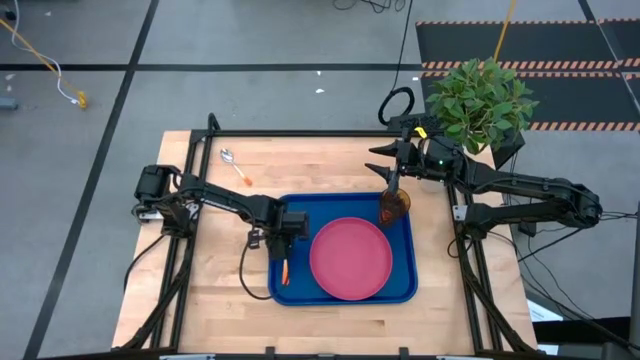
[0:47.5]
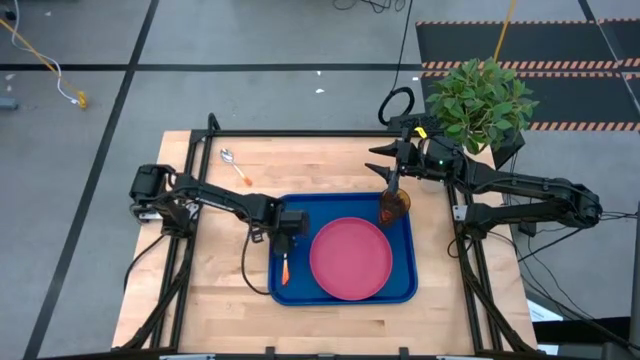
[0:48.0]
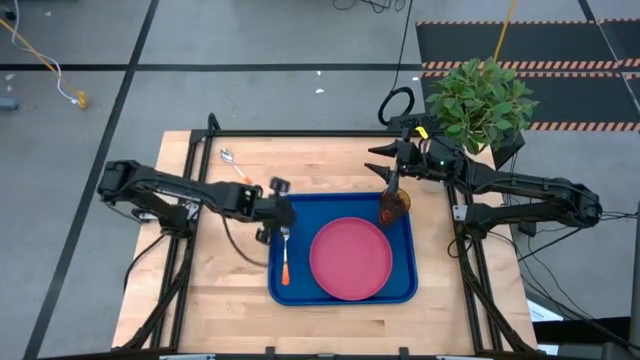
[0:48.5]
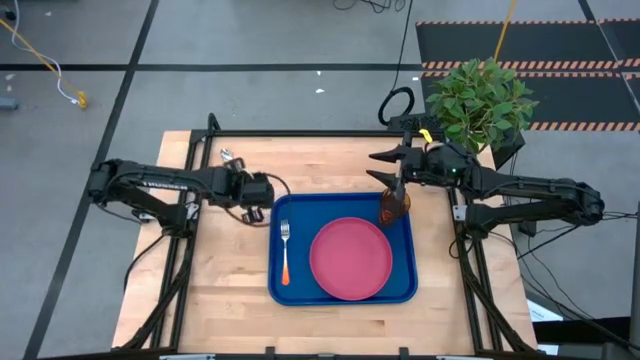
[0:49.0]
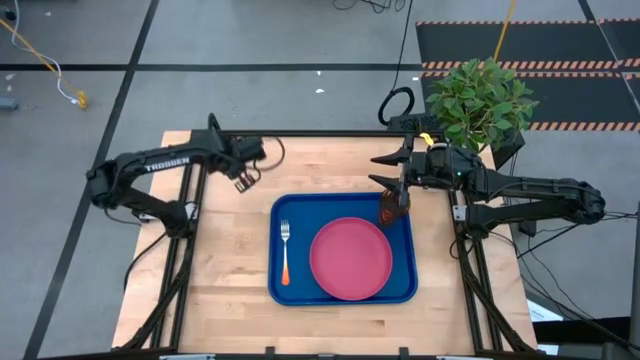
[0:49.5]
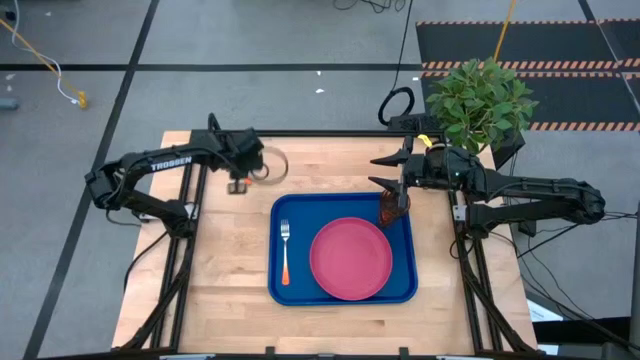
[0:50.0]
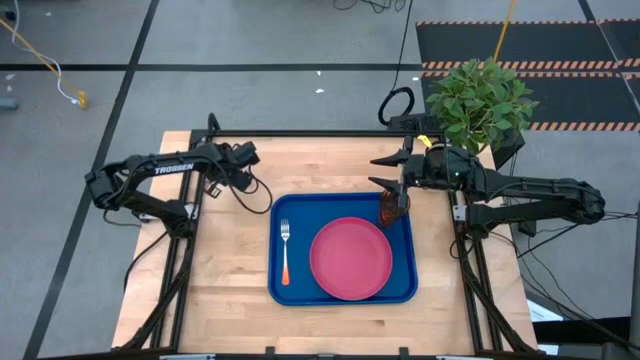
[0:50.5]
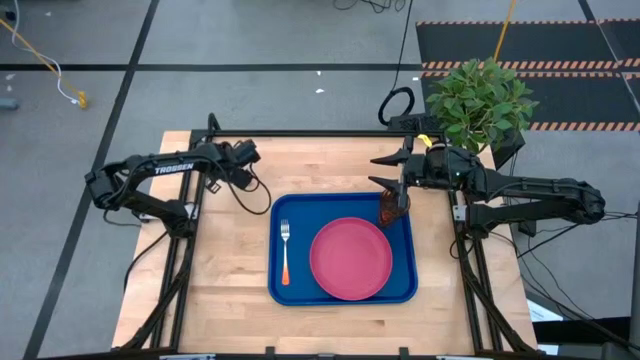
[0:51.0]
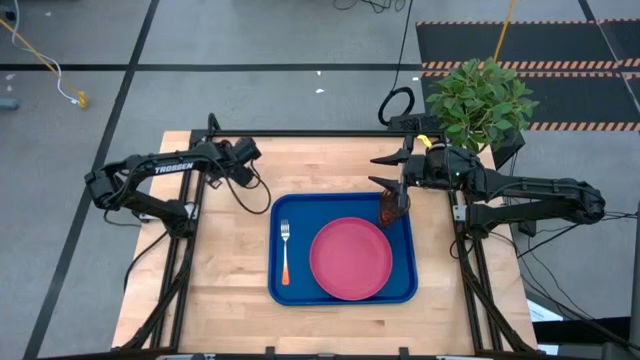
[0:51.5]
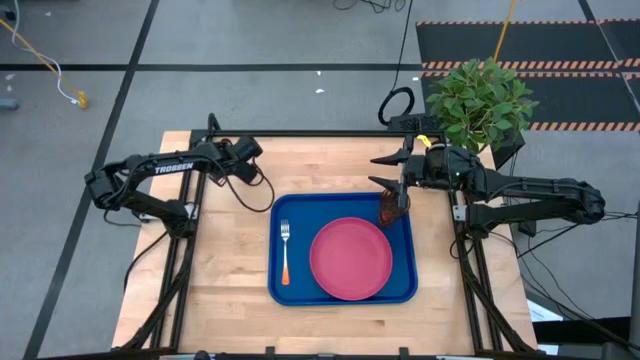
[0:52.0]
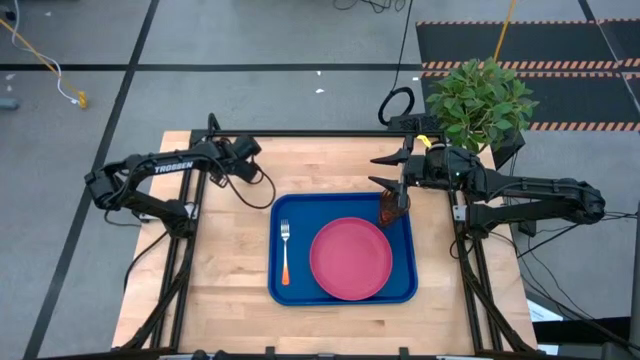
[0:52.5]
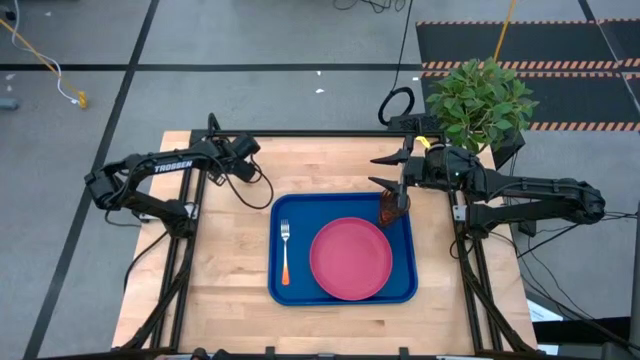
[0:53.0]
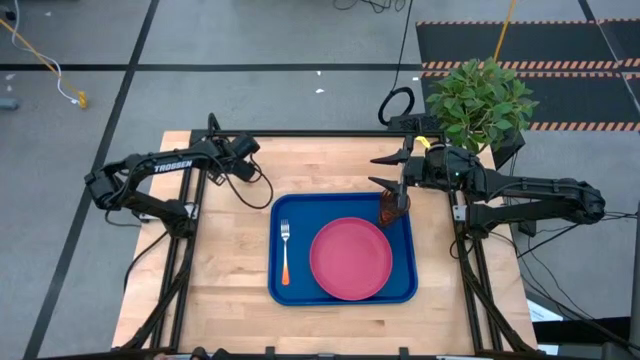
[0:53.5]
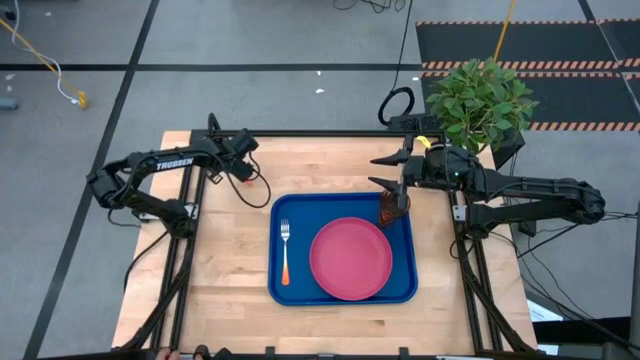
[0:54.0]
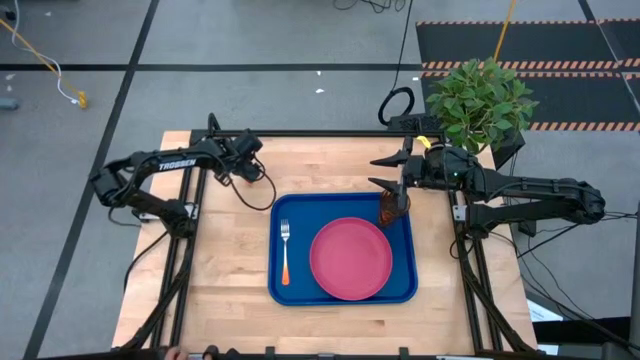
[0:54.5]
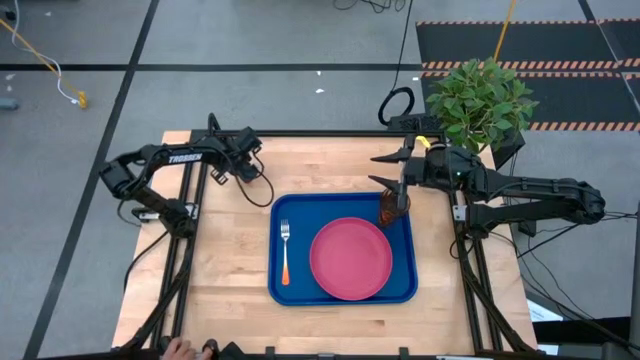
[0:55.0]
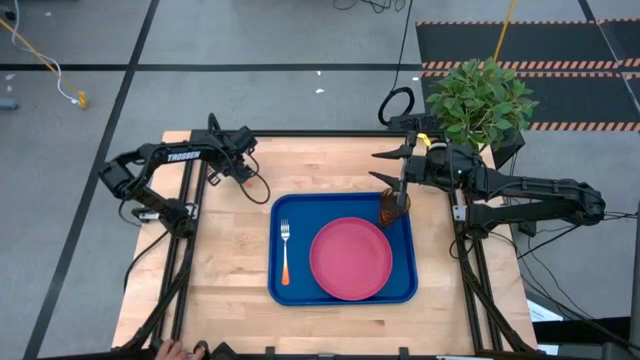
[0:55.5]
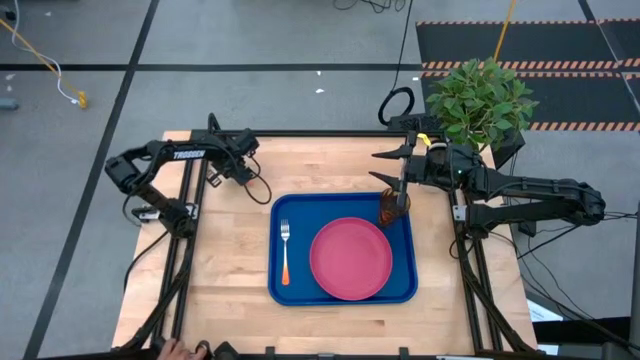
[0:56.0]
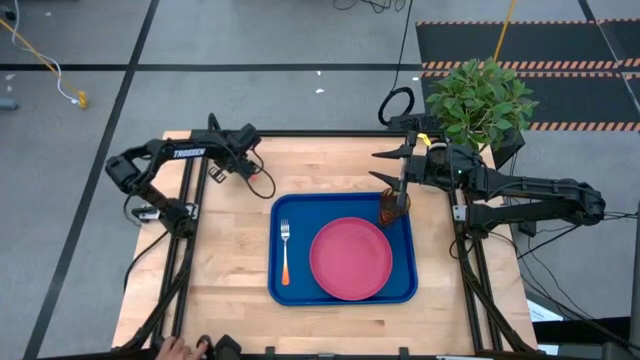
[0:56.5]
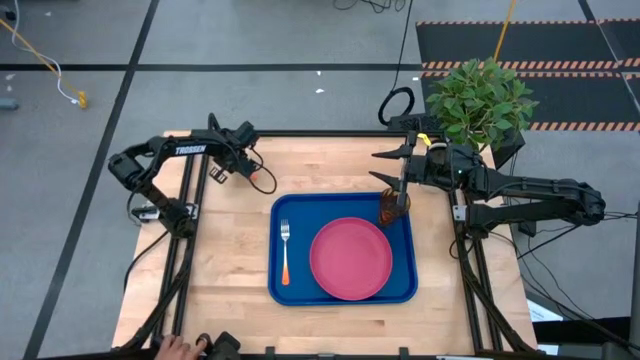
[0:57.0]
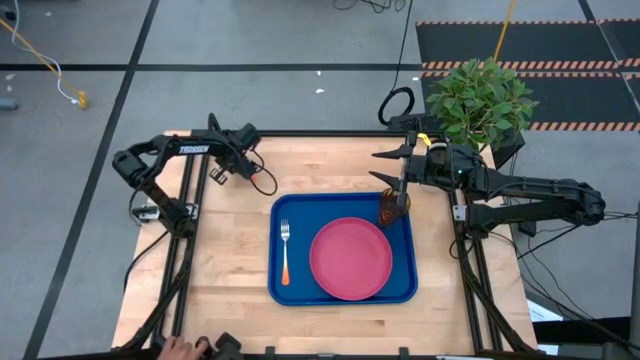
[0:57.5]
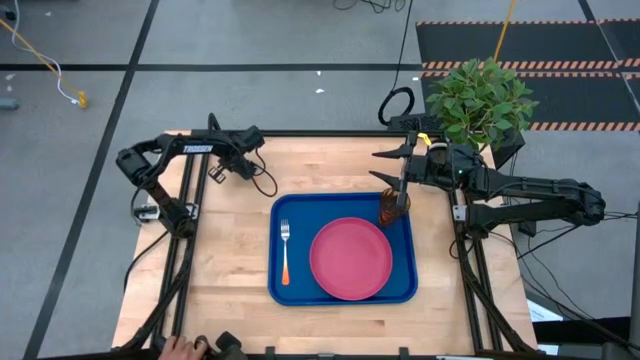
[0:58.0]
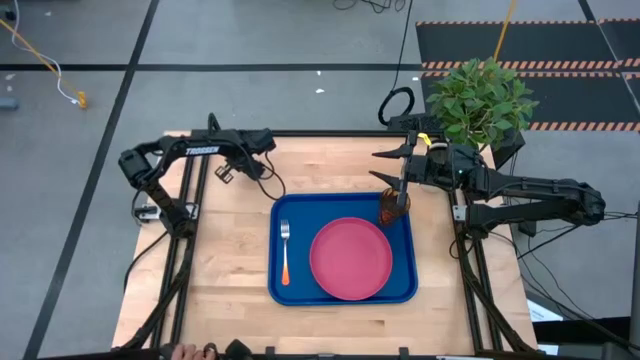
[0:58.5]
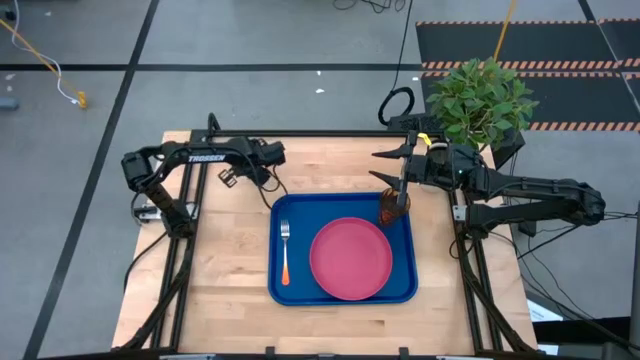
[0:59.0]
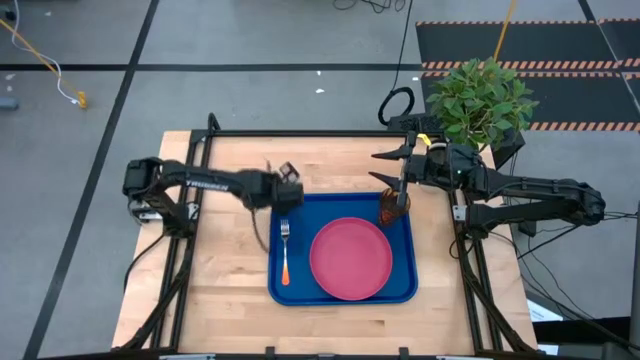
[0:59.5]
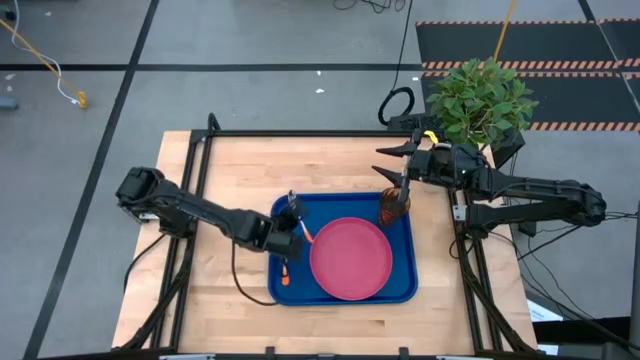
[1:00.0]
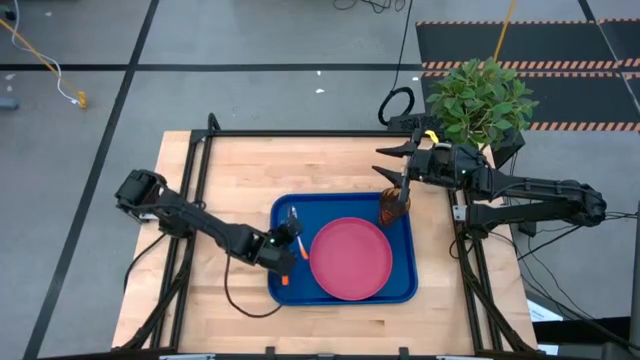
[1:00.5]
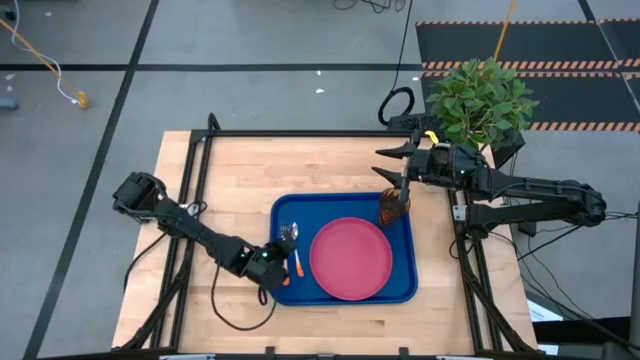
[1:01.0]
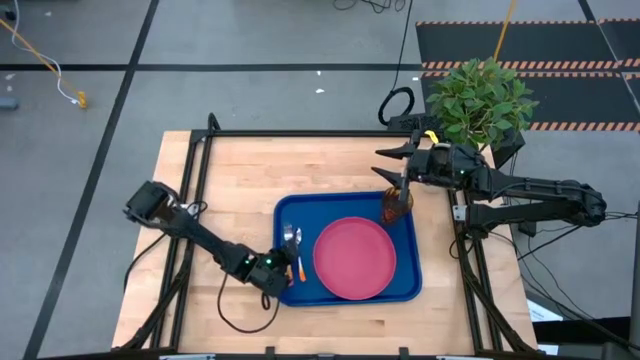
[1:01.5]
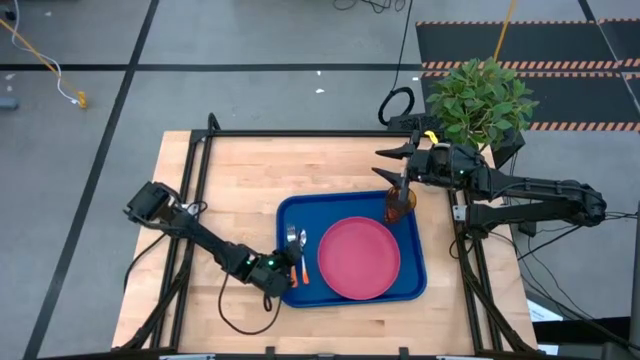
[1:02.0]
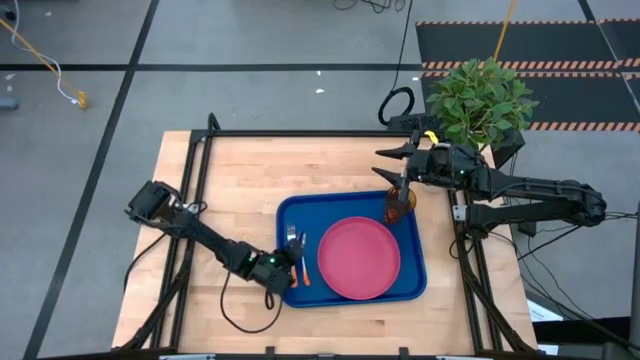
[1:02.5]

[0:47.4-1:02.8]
Task: Pick and place plate/cup/fork/spoon on tray
Put the orange spoon on the blue tray between the orange fork and pink plate

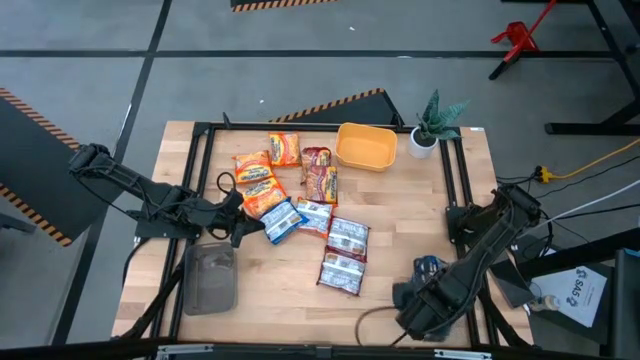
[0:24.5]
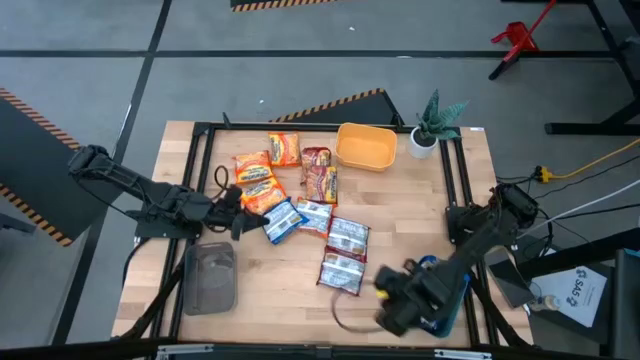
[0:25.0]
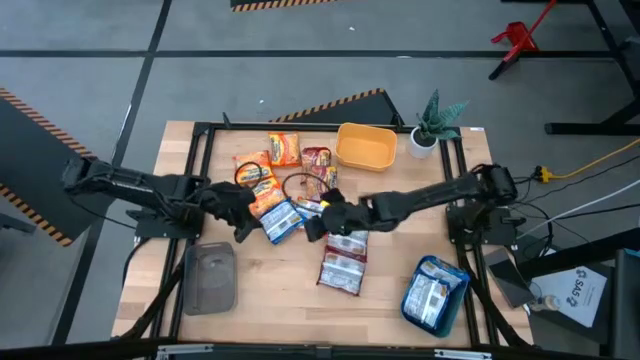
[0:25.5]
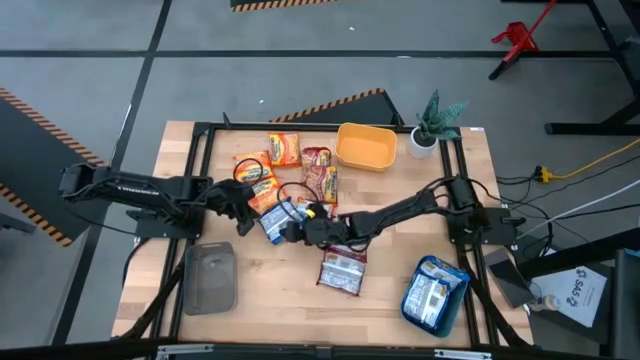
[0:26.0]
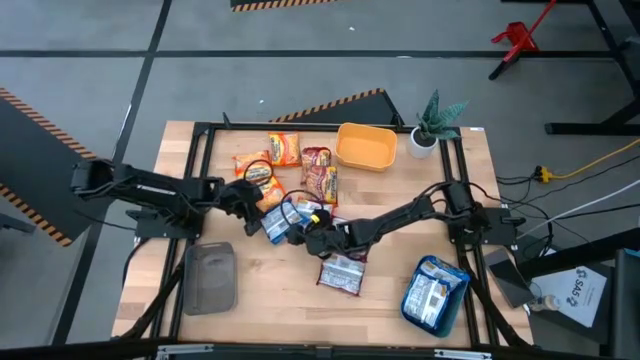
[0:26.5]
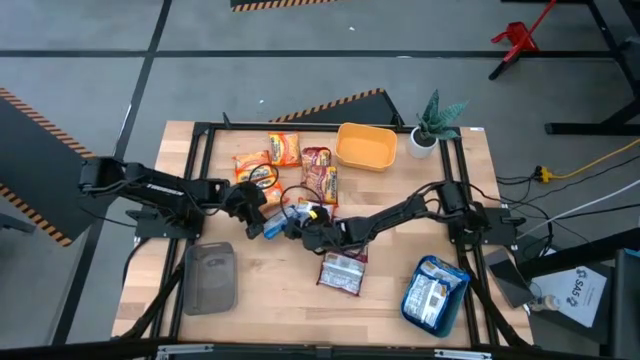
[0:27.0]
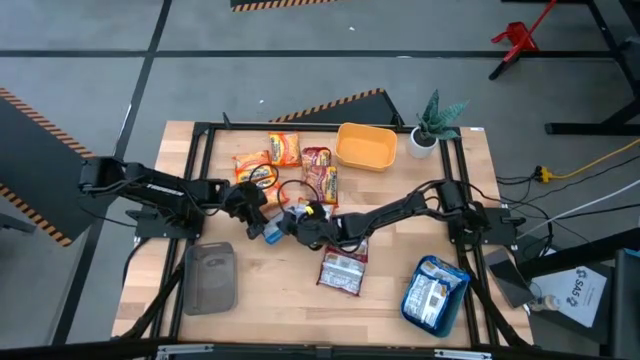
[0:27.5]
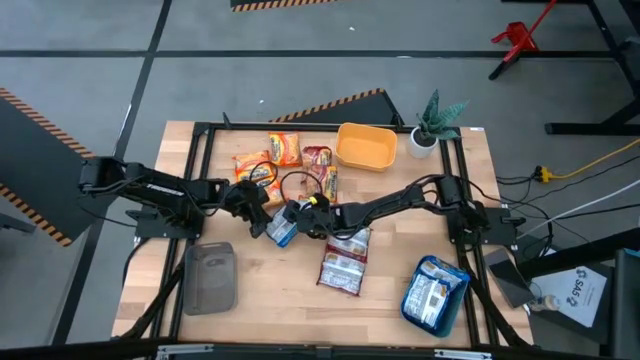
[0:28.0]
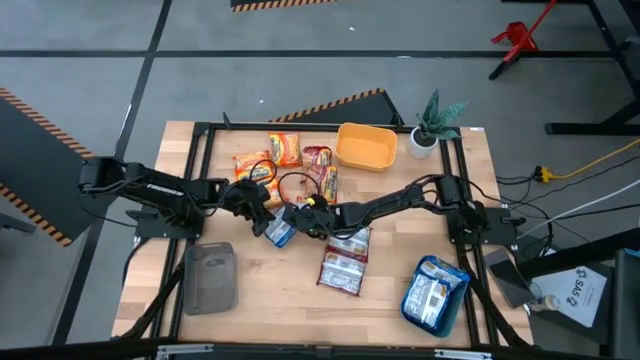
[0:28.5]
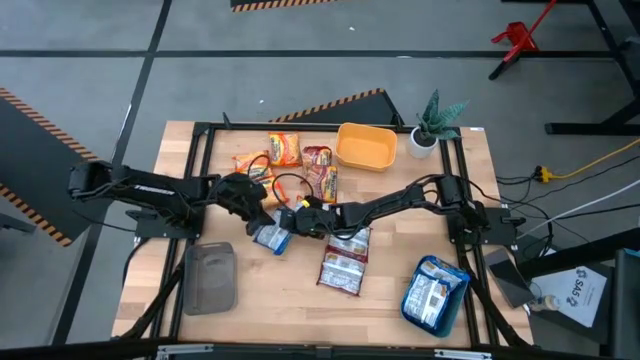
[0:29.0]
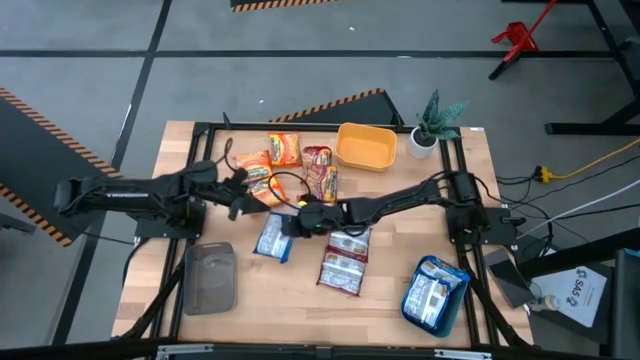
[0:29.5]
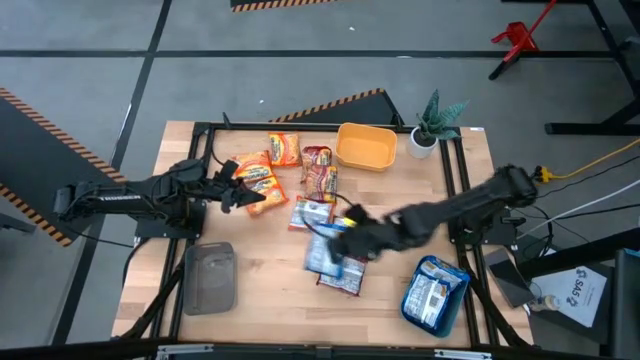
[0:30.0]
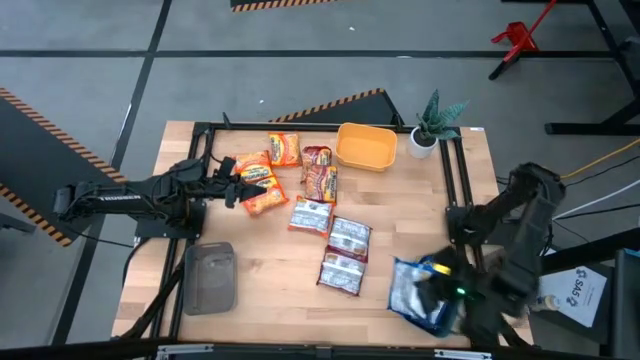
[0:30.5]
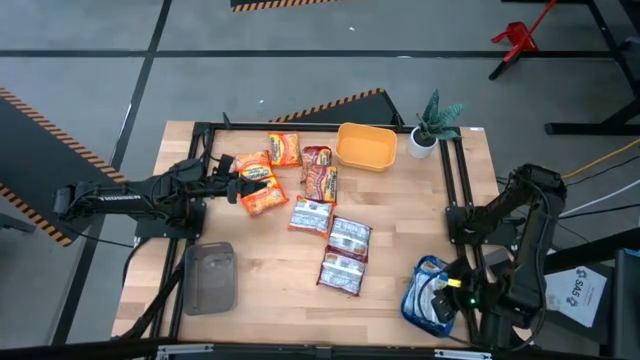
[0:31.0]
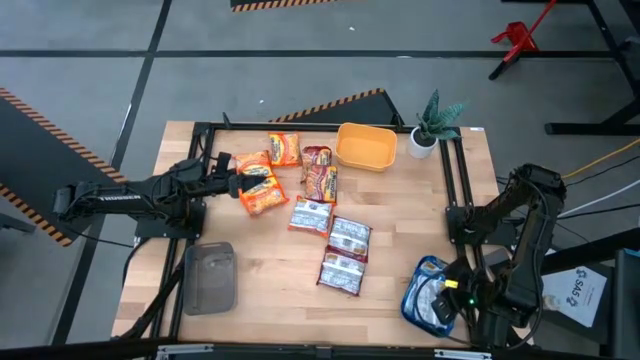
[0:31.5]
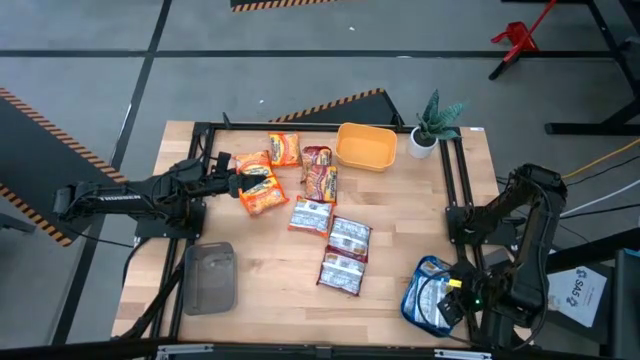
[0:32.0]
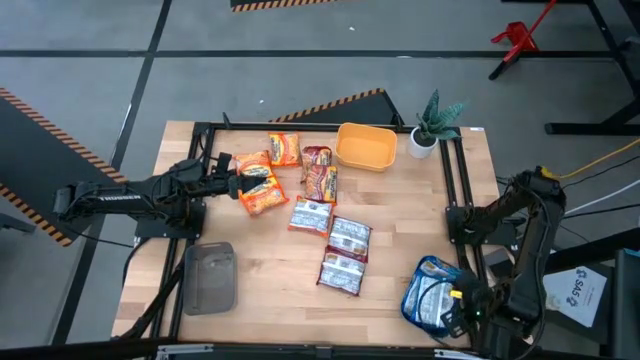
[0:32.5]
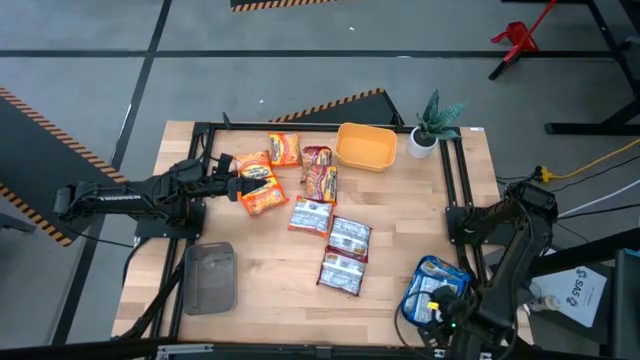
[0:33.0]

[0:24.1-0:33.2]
Task: Sort Maruchan noodles
Put the blue noodle pack into the blue bin
